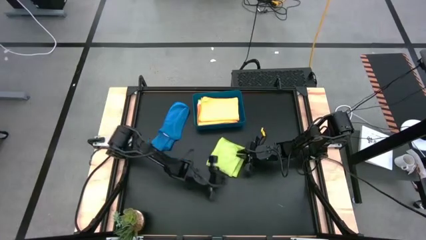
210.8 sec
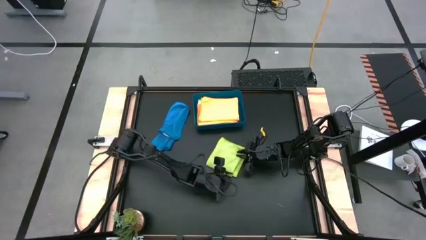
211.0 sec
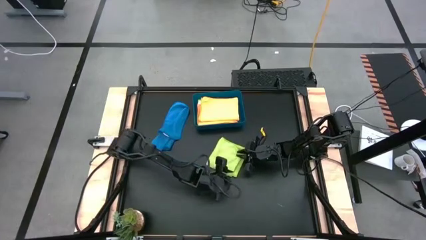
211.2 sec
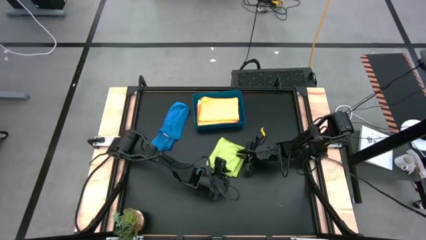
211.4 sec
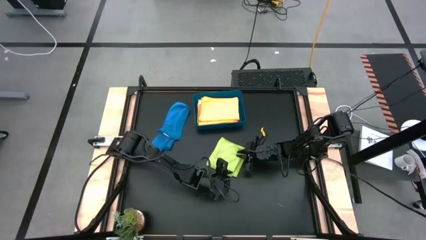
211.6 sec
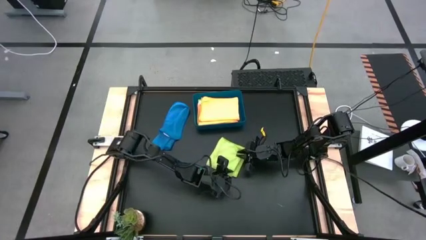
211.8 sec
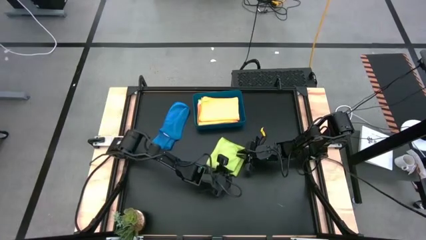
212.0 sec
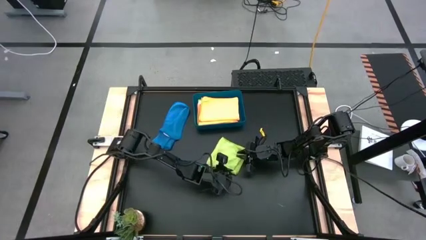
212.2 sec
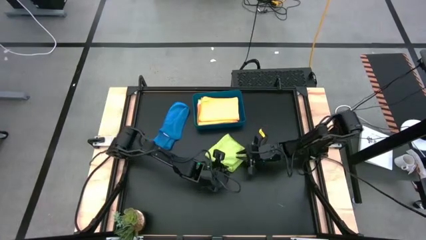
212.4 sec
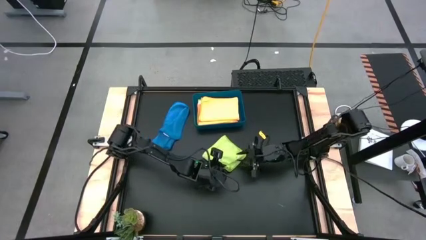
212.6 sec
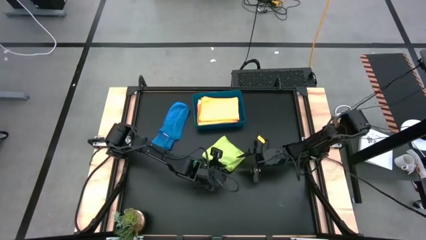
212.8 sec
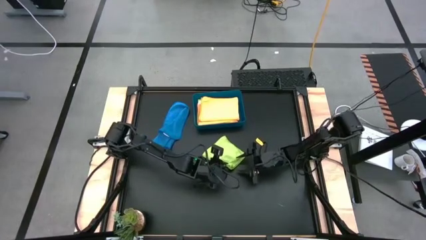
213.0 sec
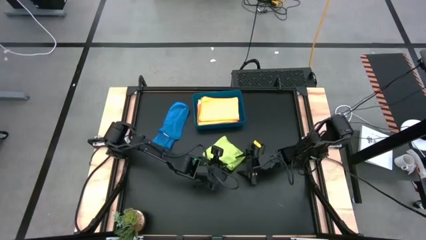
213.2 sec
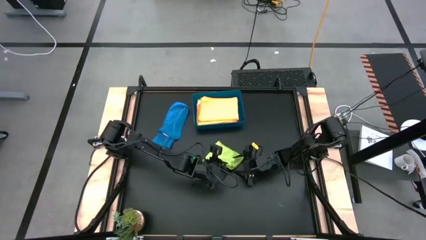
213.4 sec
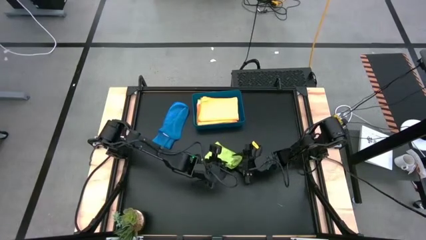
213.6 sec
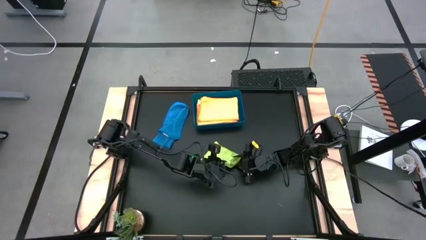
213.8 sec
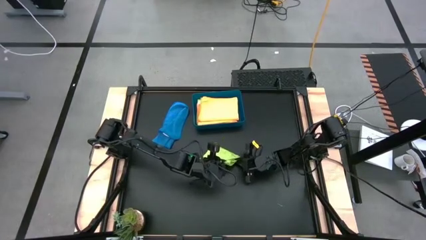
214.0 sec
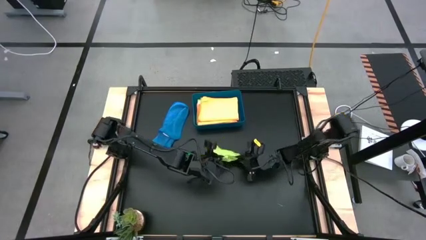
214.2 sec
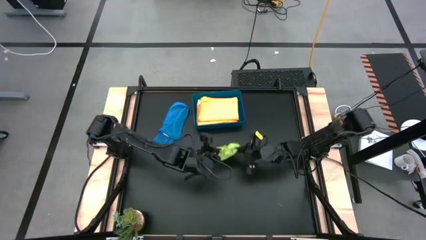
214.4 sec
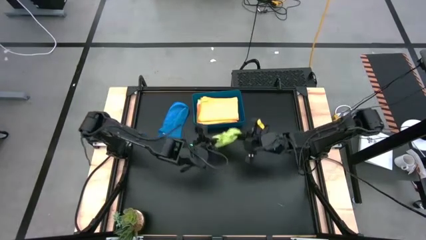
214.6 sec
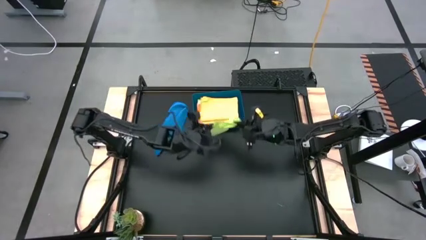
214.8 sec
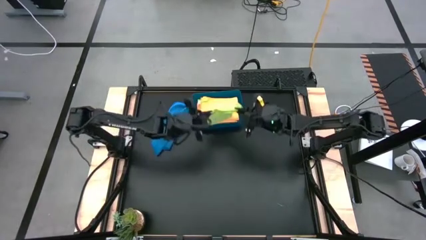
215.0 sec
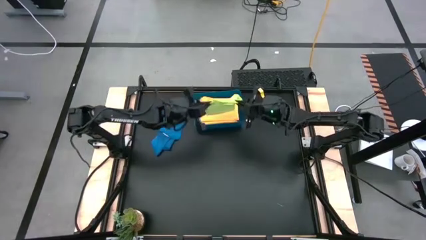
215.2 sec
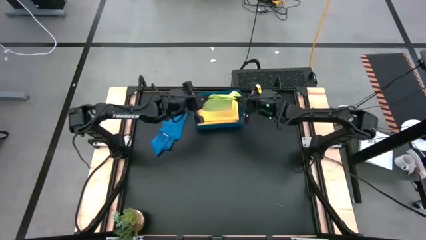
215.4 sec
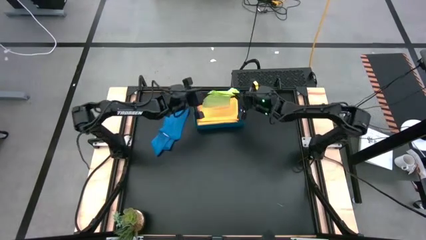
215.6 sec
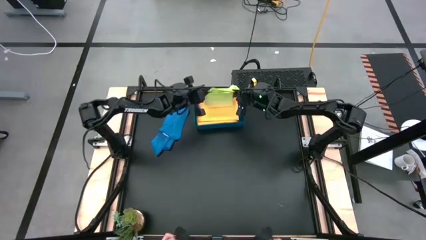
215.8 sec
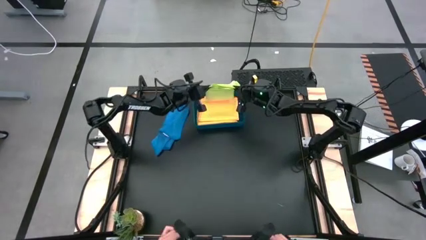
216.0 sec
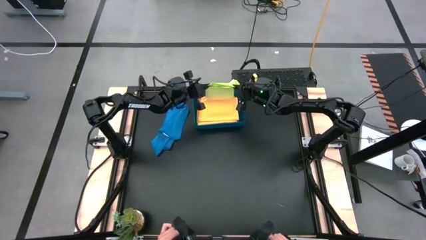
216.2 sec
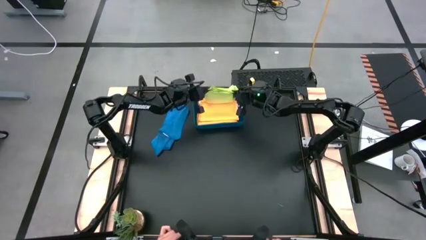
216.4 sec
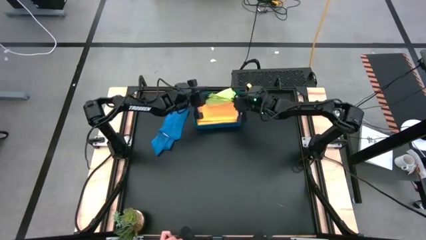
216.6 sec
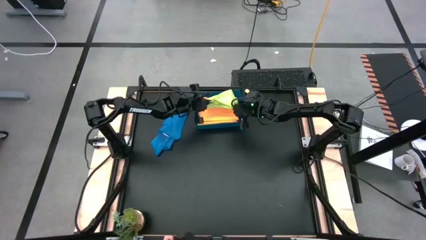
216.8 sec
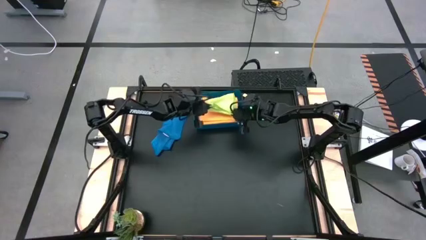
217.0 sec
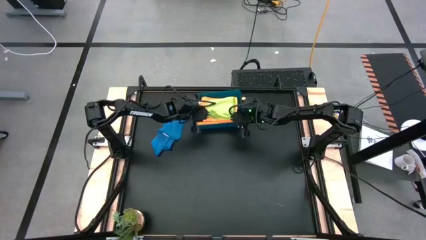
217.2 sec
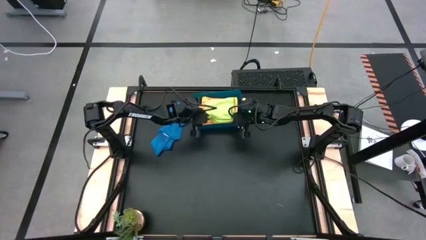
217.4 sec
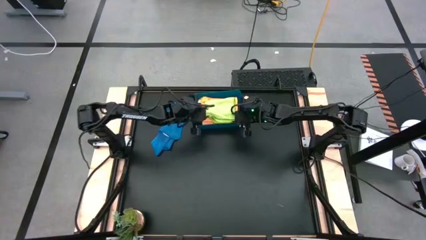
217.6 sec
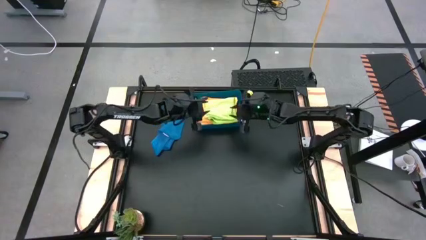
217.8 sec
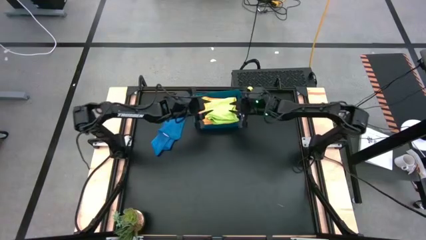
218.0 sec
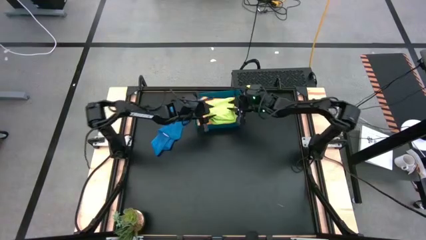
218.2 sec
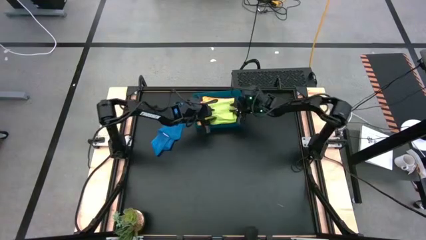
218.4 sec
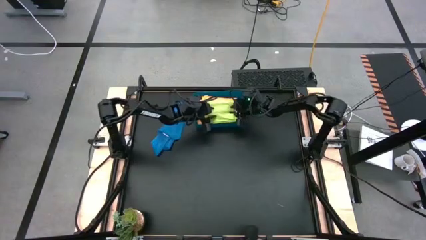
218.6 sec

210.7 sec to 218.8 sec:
Task: Fold microfiber towels
Put the folded green microfiber cloth into the blue bin

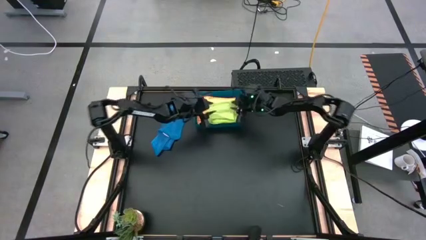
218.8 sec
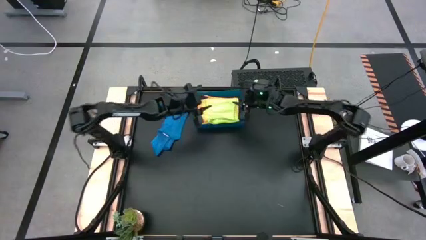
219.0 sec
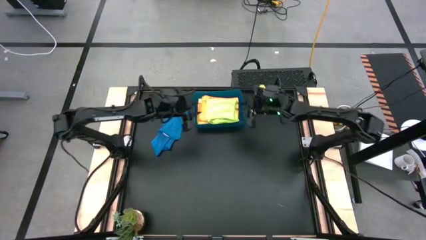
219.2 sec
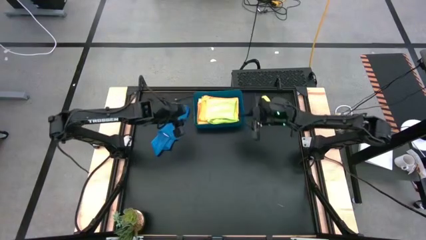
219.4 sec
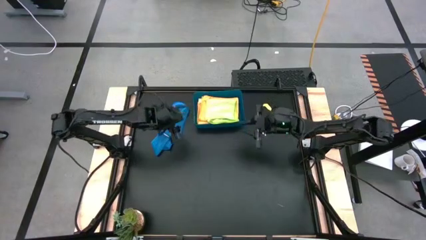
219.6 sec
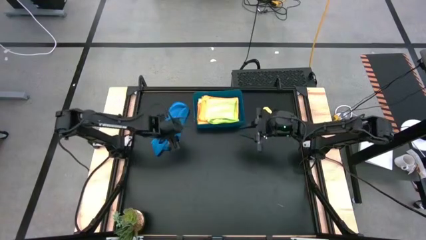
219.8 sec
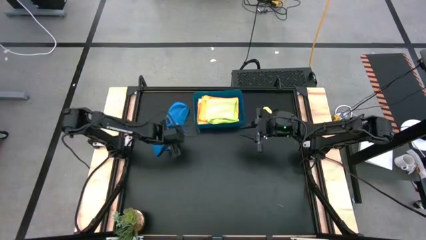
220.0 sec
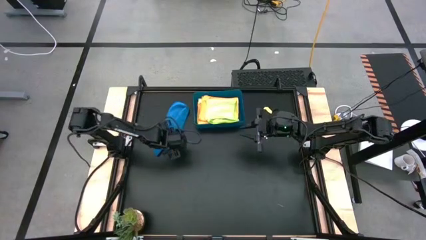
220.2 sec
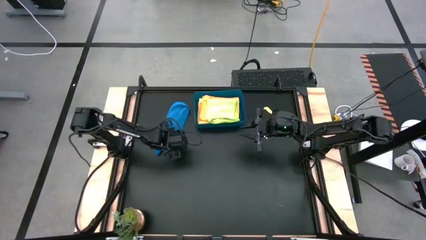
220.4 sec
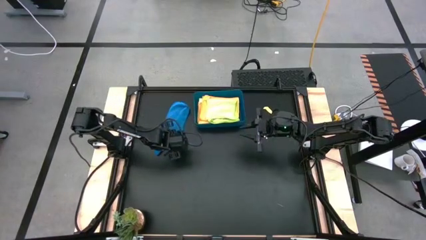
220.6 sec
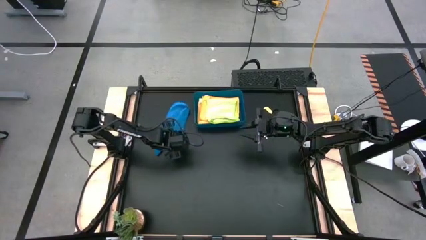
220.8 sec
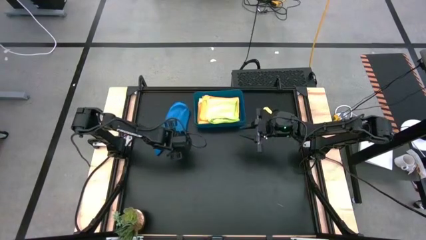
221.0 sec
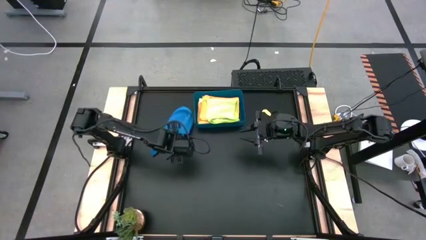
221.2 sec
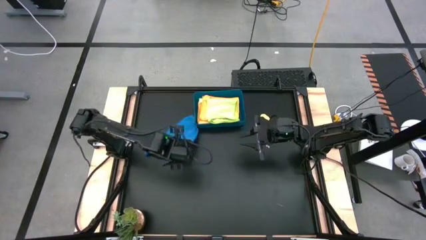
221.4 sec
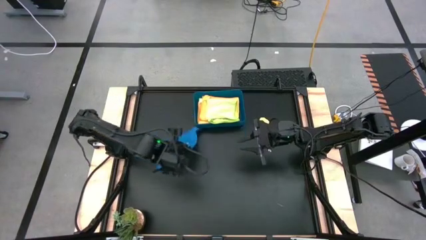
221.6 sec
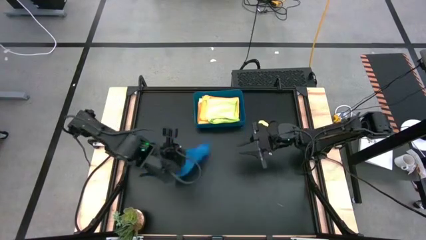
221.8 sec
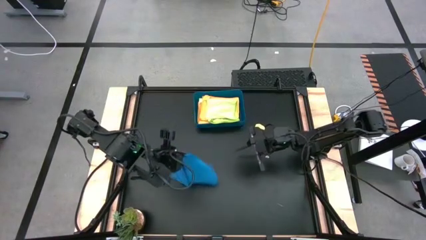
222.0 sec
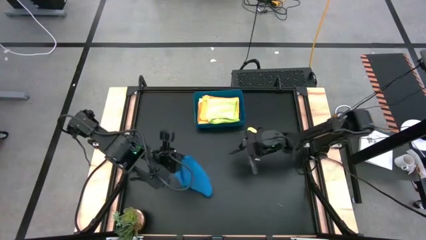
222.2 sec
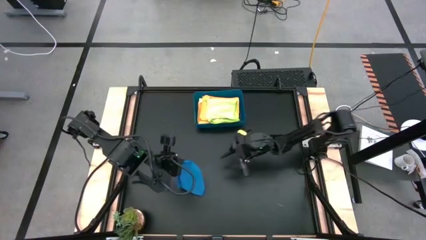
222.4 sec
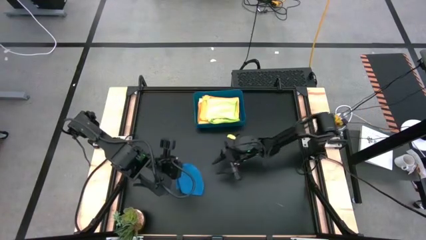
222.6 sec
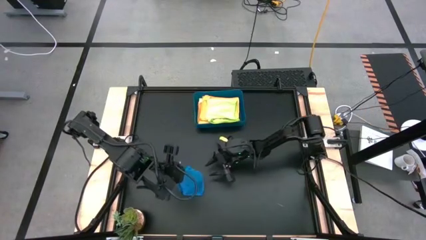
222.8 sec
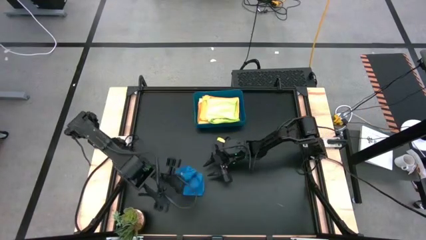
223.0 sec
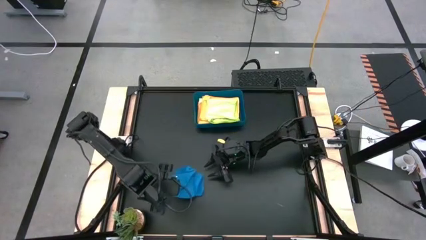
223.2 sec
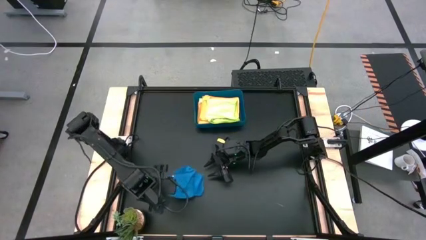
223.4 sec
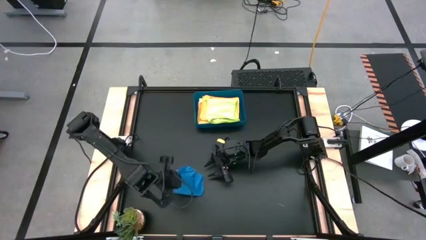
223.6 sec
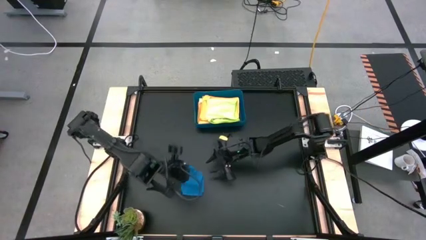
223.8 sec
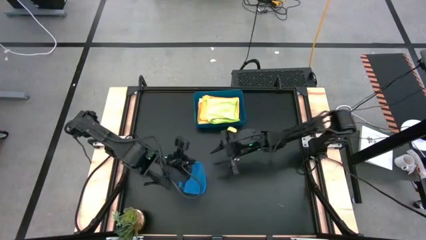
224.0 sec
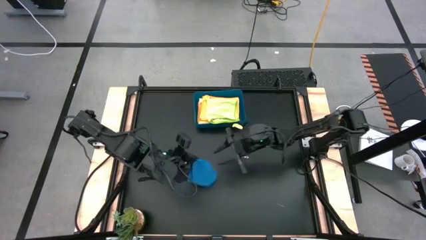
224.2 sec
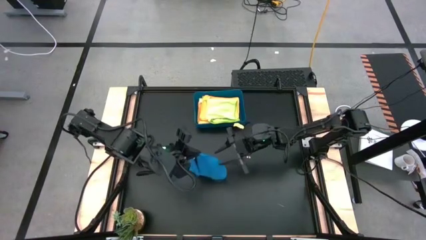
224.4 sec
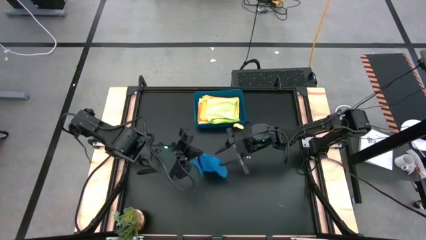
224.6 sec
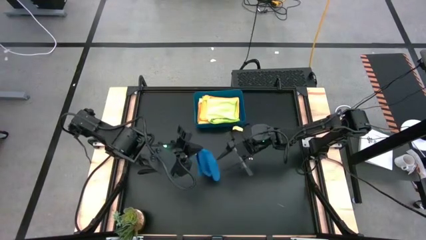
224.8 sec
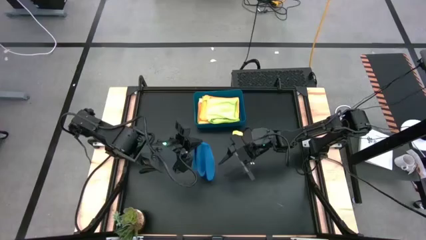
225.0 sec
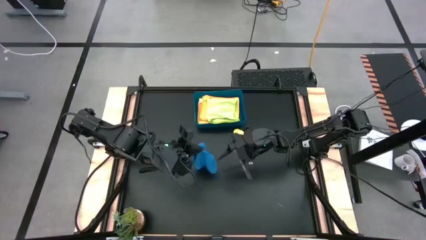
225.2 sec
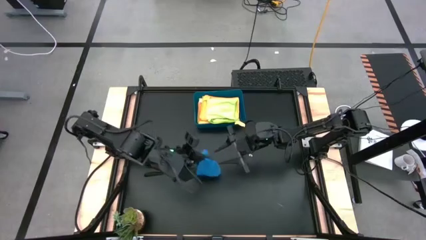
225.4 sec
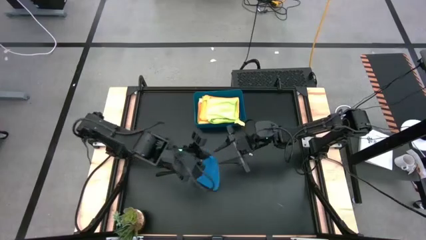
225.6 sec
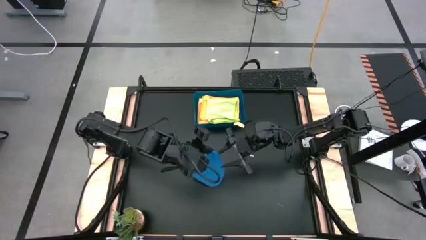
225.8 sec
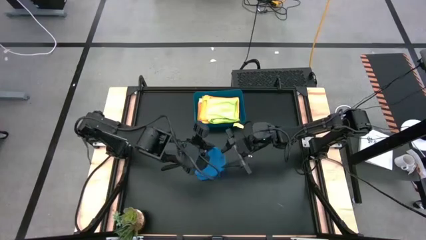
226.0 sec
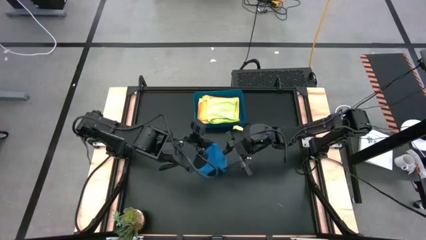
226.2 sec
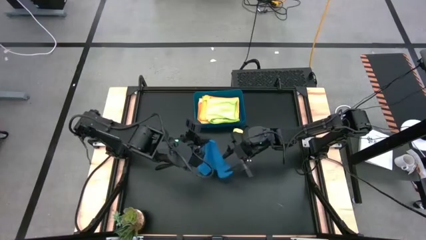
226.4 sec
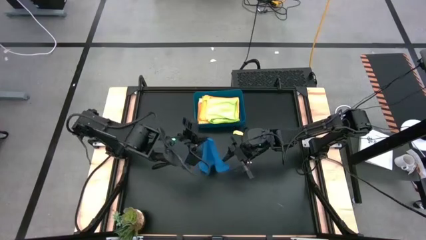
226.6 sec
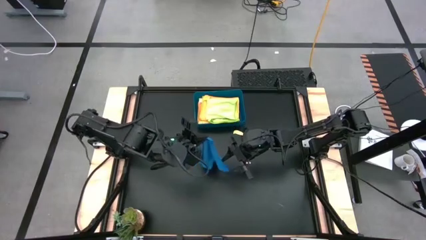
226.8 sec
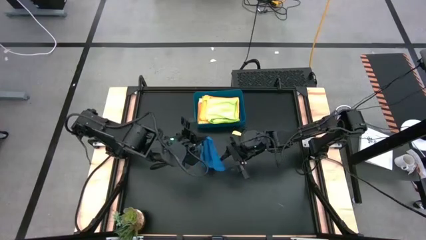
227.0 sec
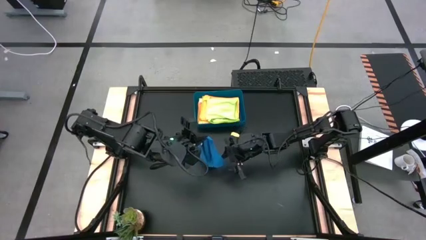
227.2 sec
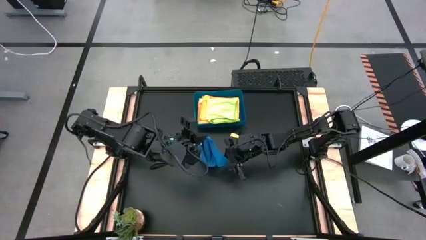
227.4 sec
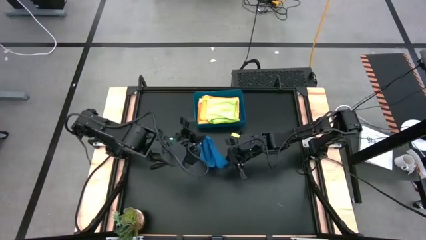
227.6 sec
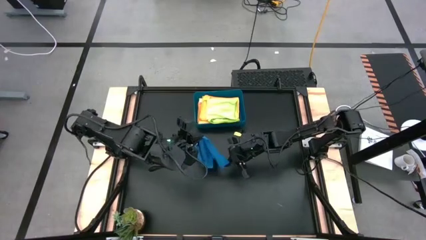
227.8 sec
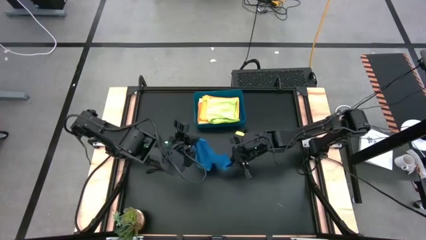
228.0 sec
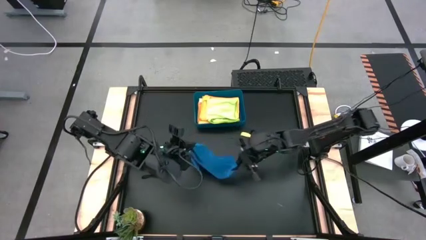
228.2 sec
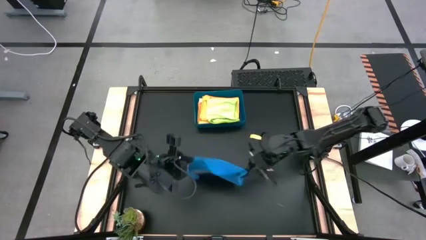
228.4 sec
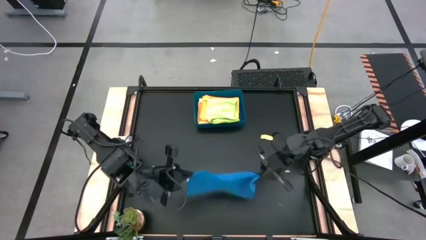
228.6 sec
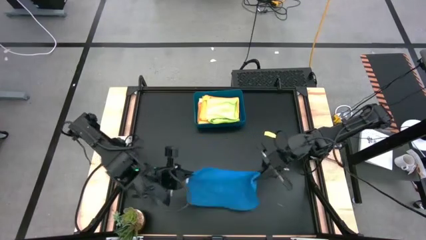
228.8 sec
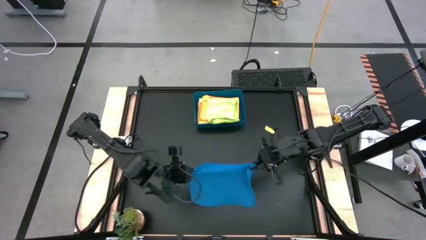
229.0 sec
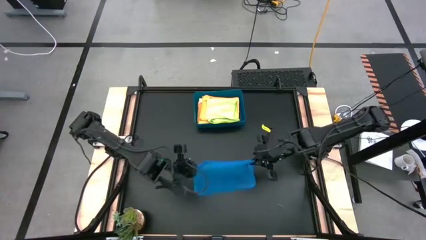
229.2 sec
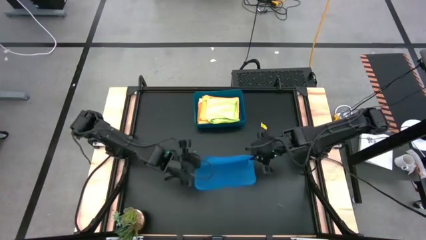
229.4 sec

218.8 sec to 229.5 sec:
Fold the blue microfiber cloth
